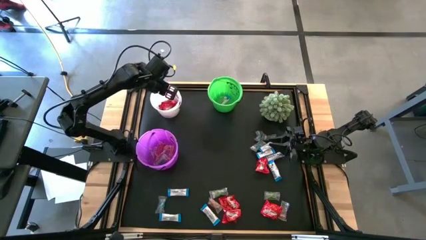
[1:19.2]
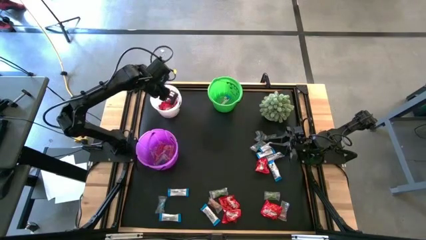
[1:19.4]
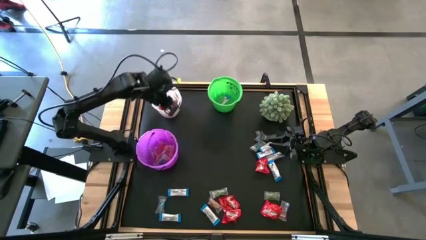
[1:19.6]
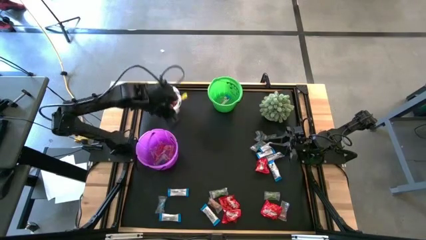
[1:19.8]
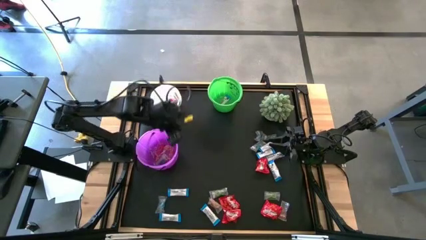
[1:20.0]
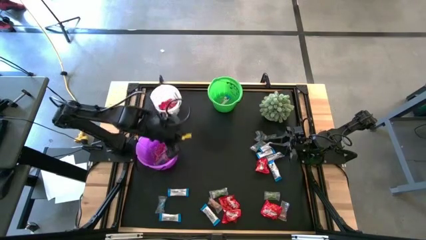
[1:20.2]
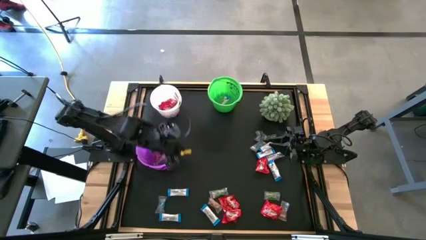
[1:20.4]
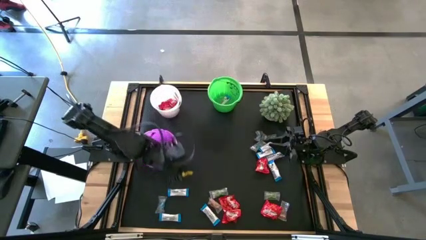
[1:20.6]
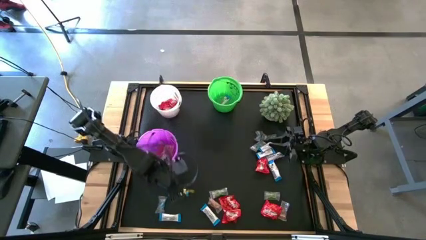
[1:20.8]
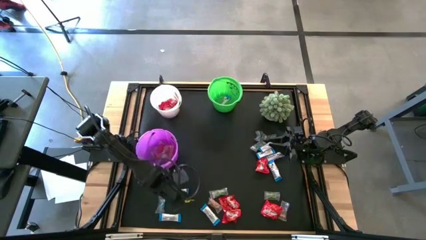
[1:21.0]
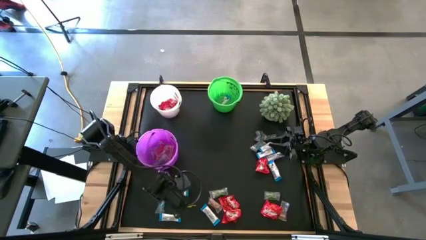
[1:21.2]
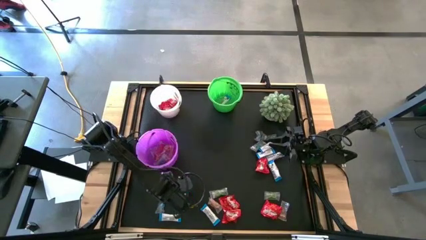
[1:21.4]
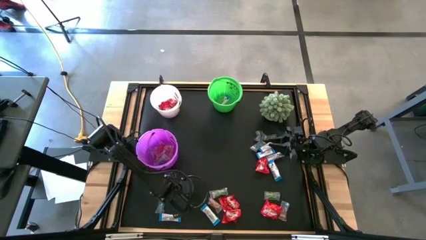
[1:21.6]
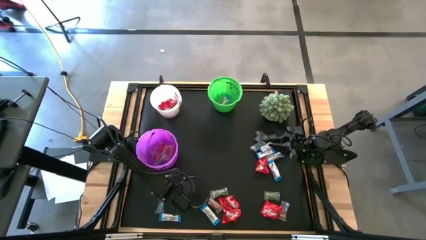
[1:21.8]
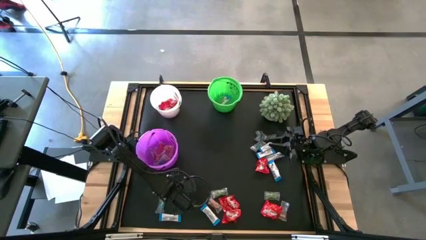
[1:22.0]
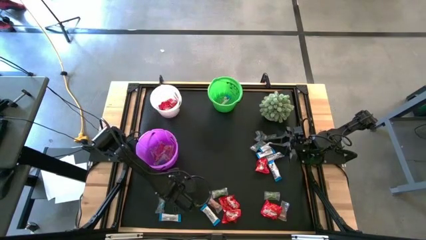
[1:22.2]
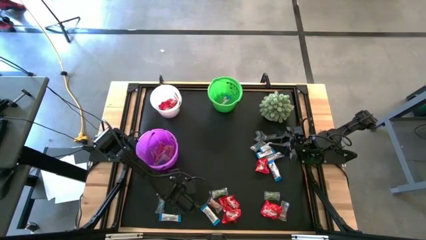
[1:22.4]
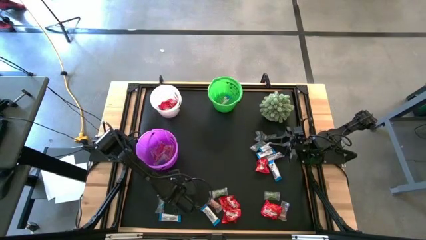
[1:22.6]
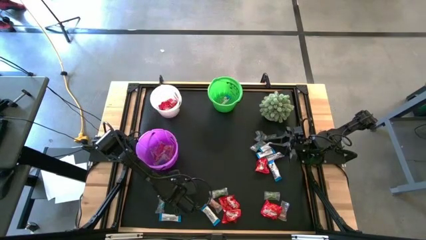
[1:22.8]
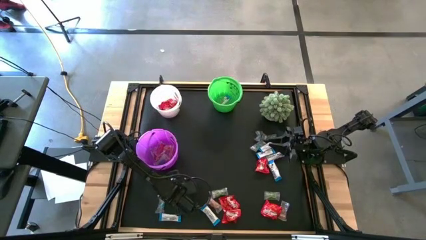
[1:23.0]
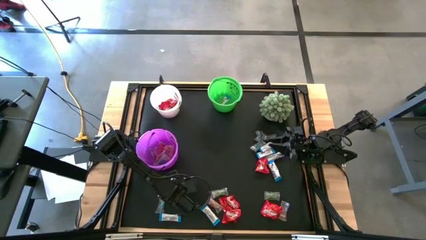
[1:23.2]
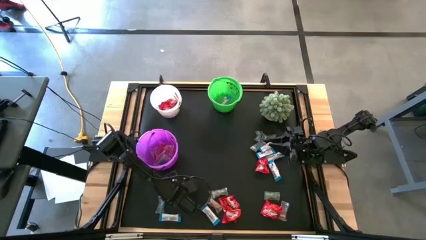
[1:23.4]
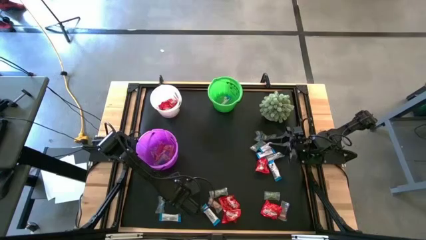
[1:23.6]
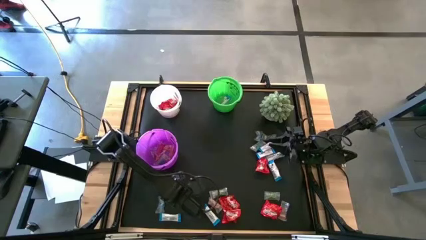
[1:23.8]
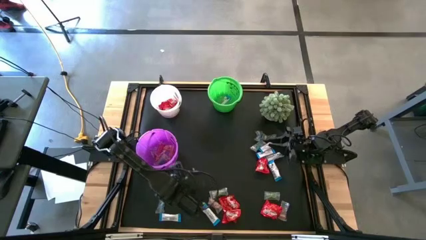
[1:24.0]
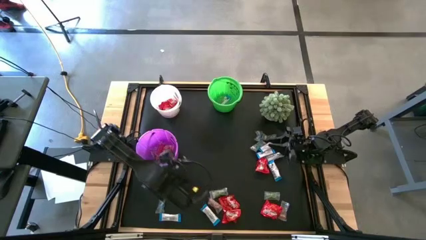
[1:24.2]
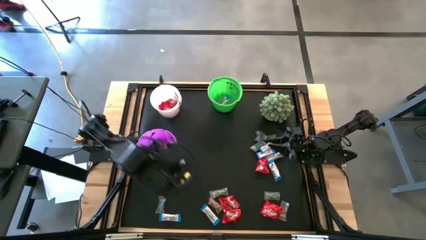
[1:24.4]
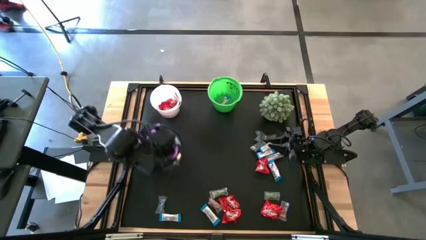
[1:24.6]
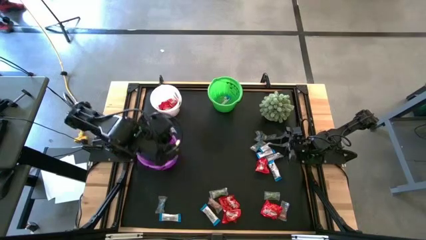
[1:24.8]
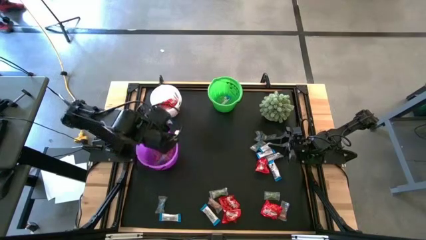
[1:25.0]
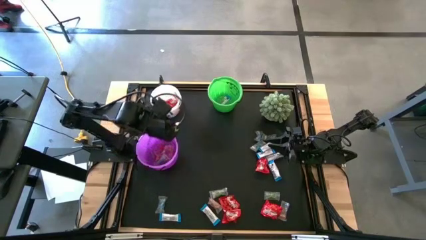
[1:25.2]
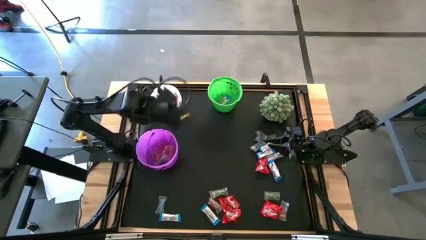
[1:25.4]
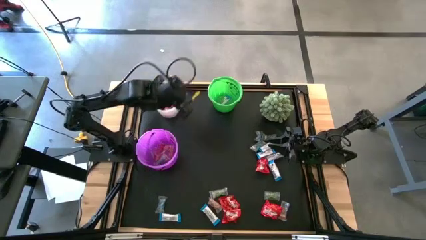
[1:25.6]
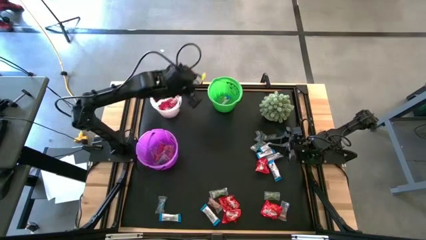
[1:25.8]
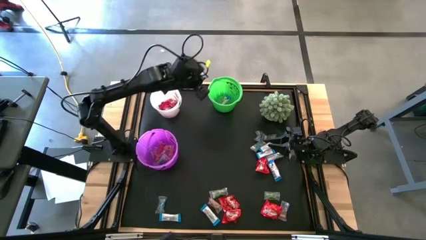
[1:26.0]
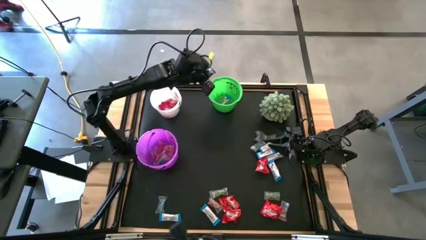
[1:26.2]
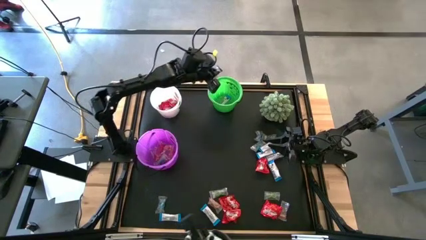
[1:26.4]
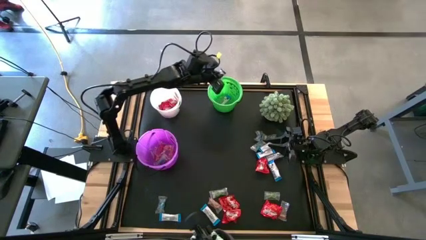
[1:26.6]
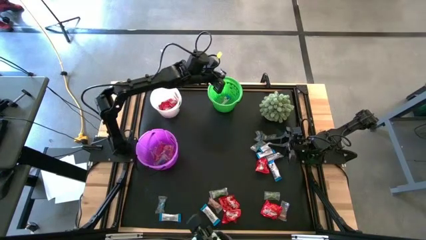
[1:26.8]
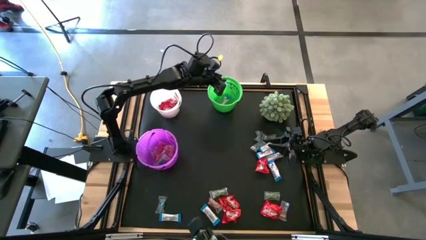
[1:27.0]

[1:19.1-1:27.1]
Task: Sort candy
Put the white chocolate into the green bucket

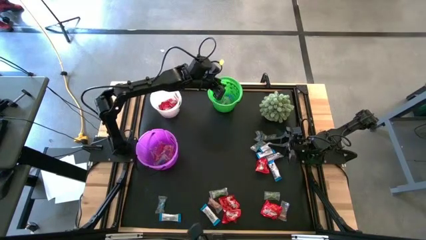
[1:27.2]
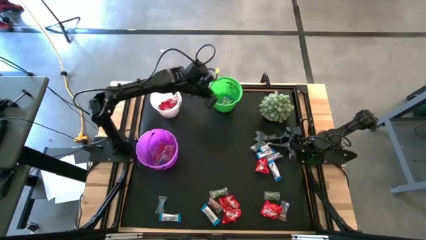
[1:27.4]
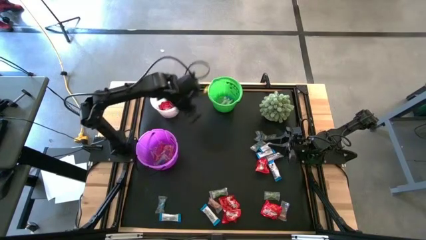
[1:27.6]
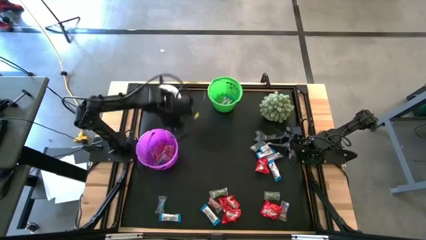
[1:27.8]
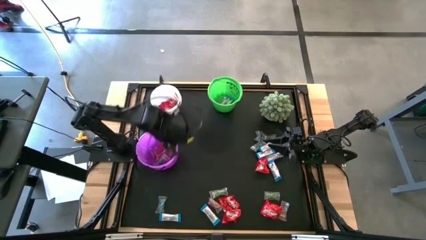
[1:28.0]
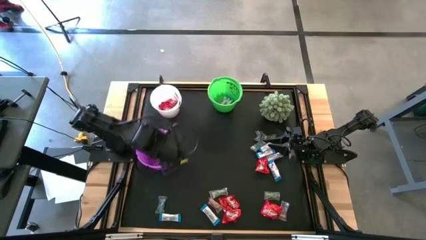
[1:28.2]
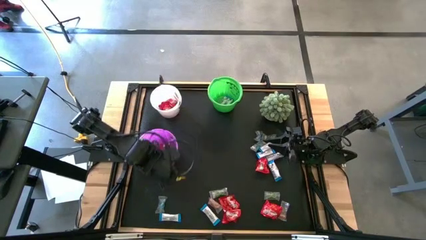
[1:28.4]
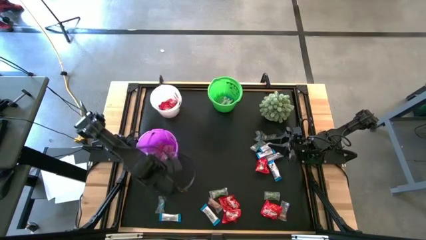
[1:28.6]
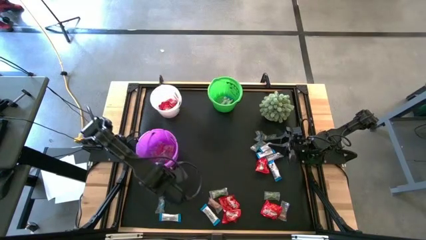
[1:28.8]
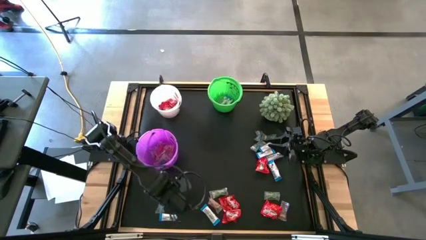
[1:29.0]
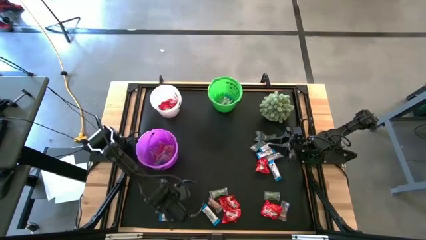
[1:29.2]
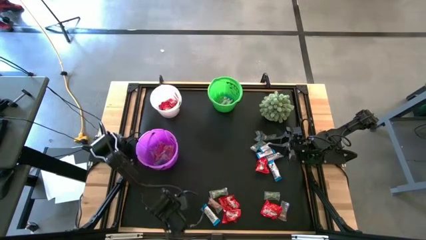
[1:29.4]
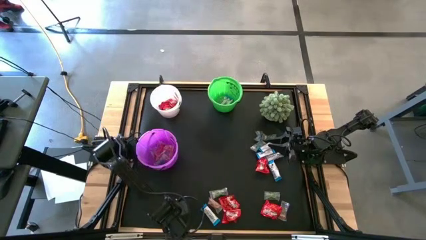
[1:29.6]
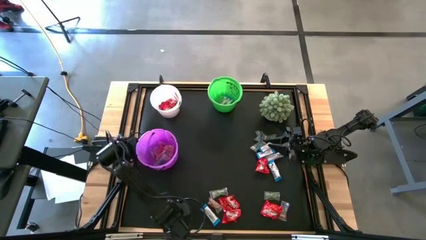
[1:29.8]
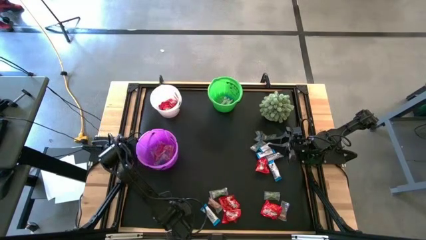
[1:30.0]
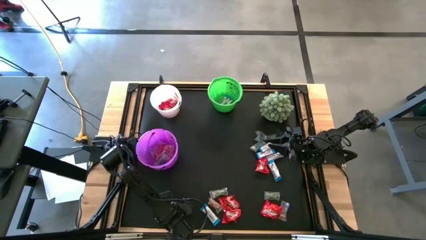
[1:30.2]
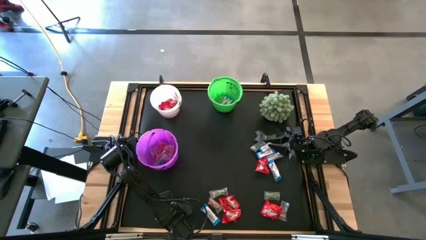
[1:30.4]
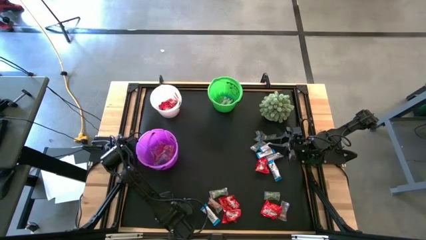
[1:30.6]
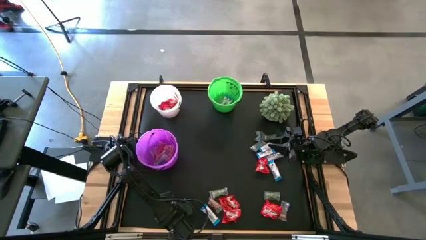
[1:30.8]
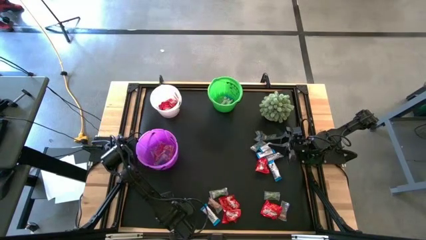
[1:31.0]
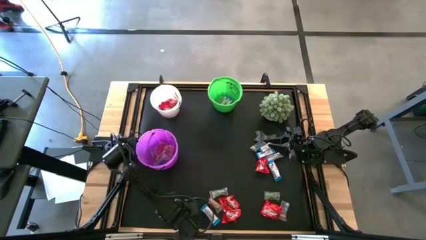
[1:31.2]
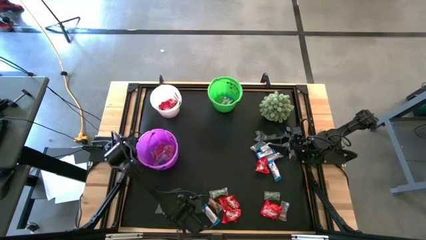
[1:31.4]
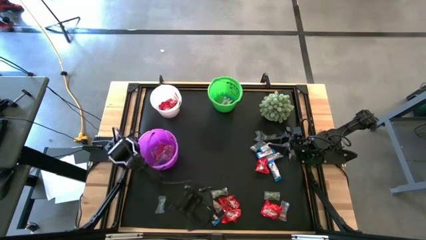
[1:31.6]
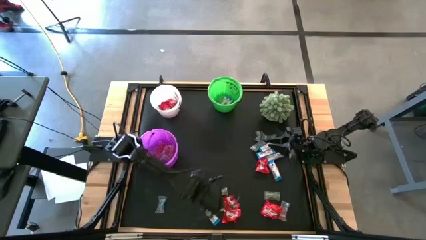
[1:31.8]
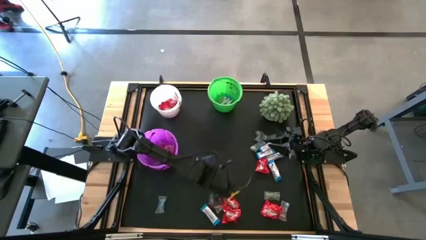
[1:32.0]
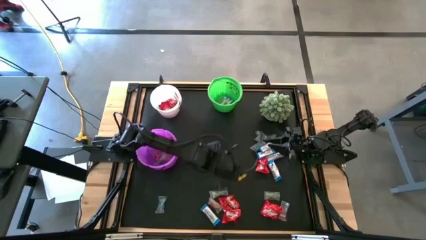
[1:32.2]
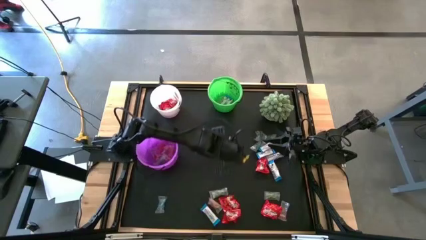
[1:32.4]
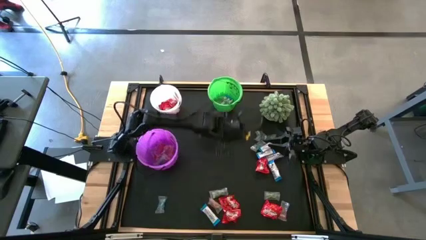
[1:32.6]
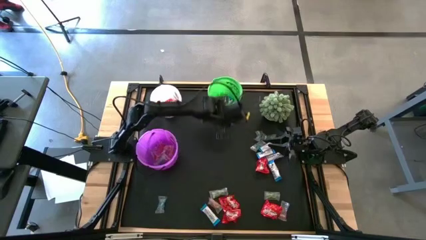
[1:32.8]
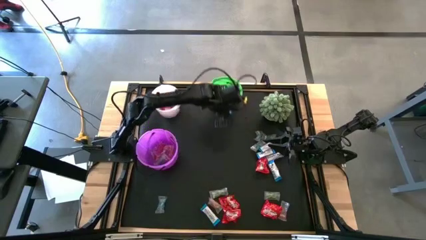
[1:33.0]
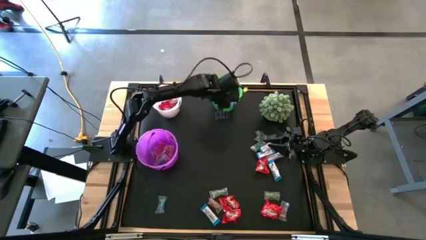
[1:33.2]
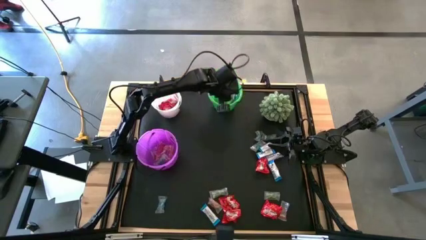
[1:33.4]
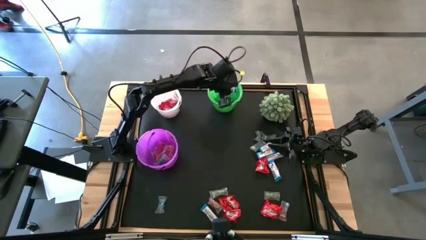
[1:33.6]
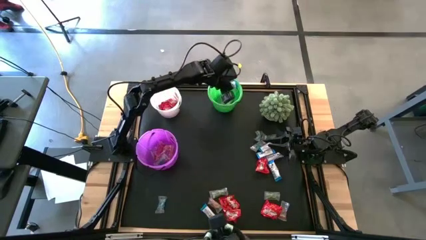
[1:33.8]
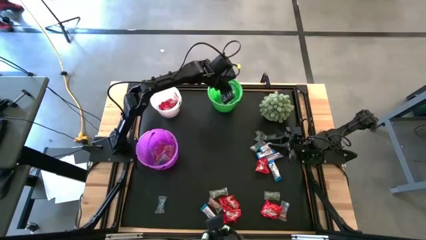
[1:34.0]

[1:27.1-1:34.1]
Put the white chocolate into the green bucket
